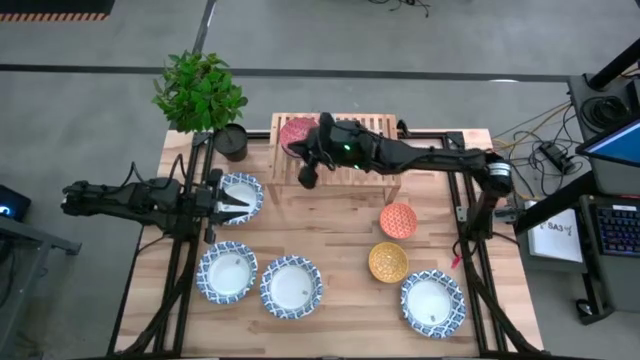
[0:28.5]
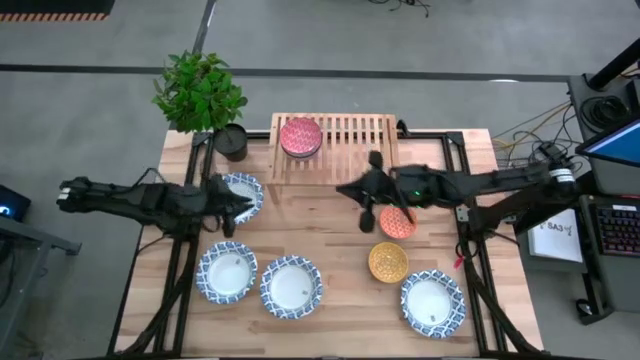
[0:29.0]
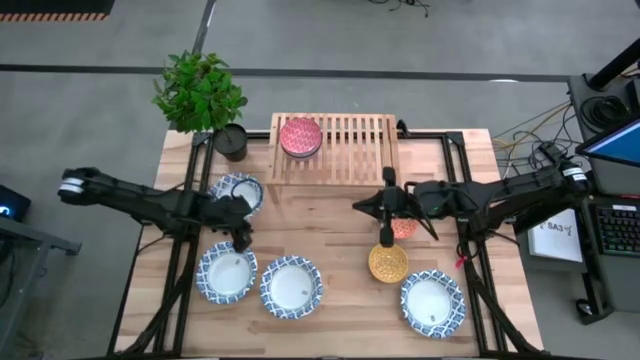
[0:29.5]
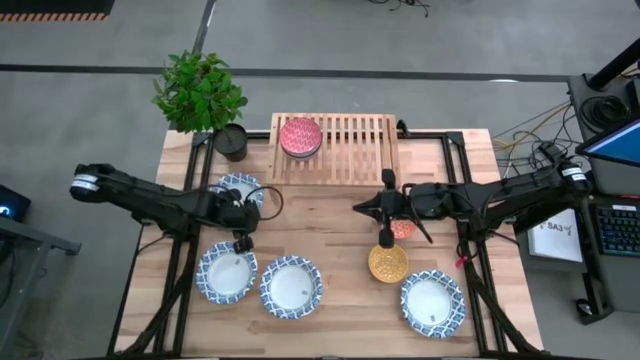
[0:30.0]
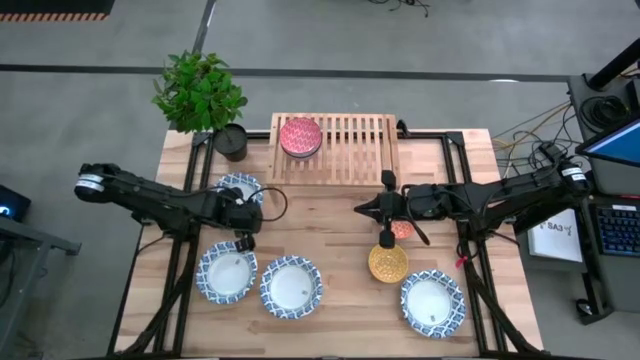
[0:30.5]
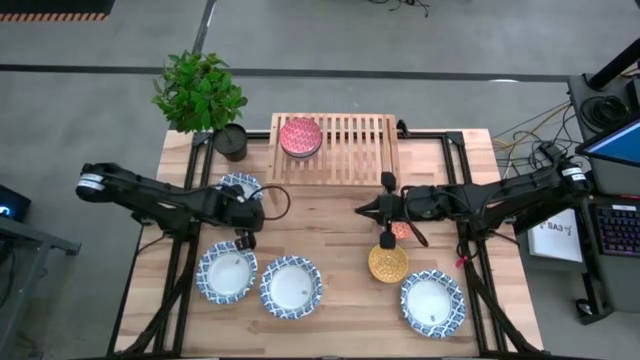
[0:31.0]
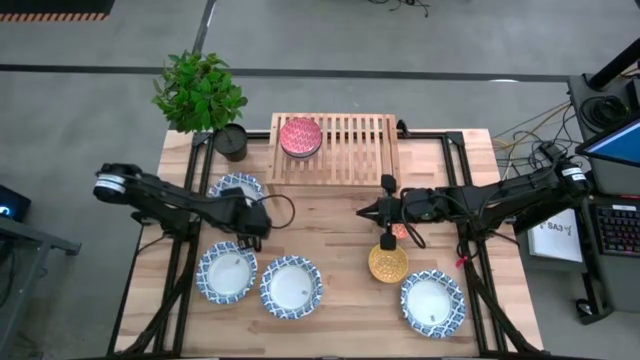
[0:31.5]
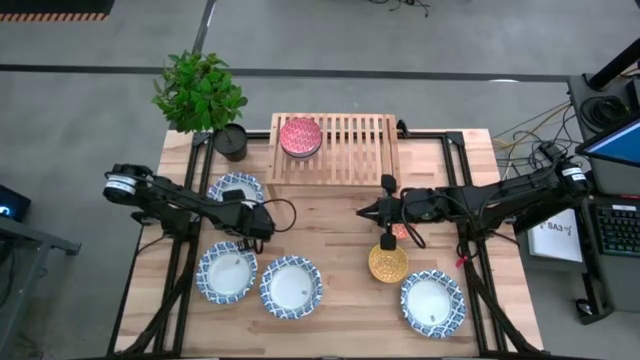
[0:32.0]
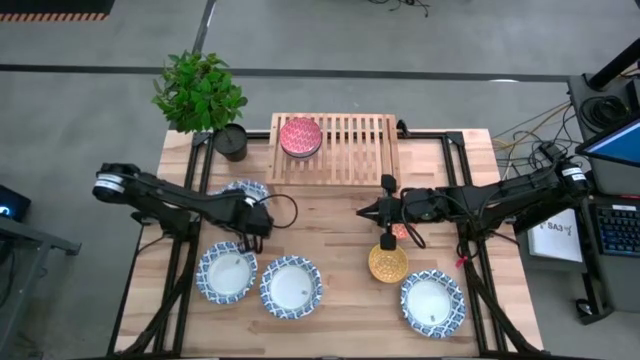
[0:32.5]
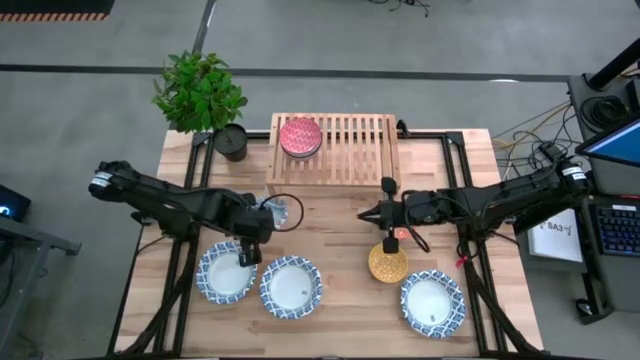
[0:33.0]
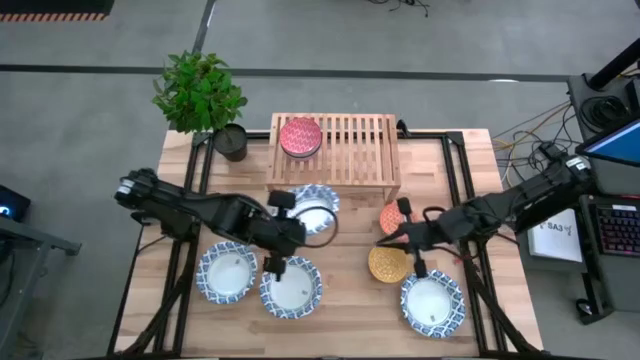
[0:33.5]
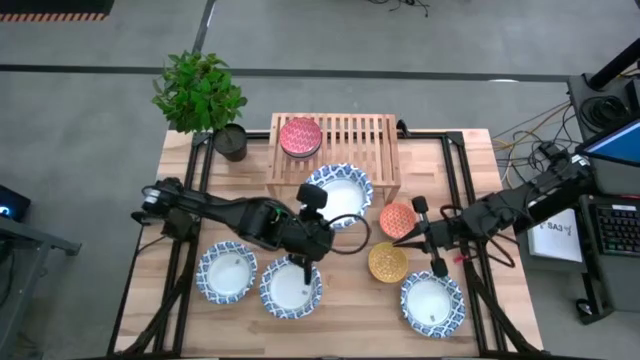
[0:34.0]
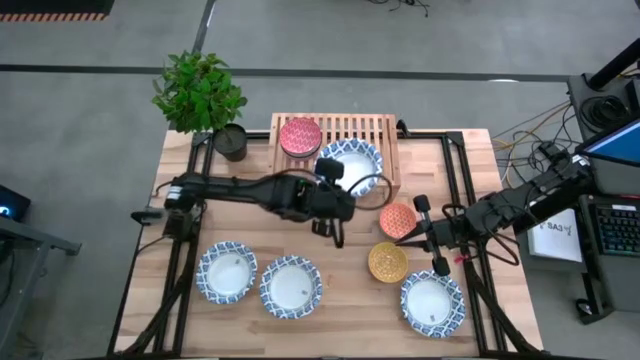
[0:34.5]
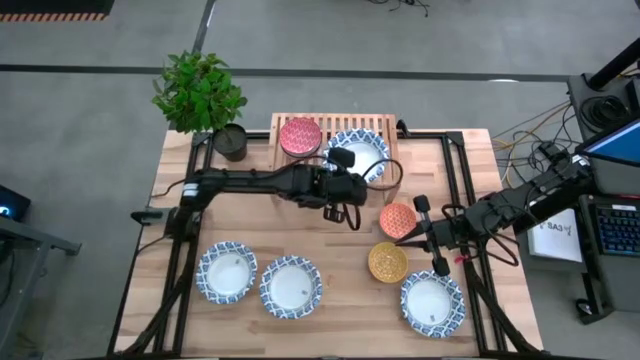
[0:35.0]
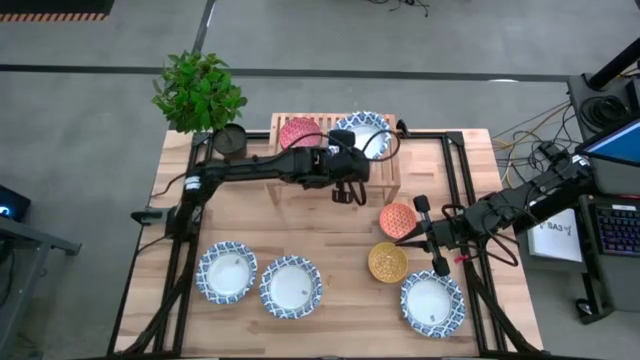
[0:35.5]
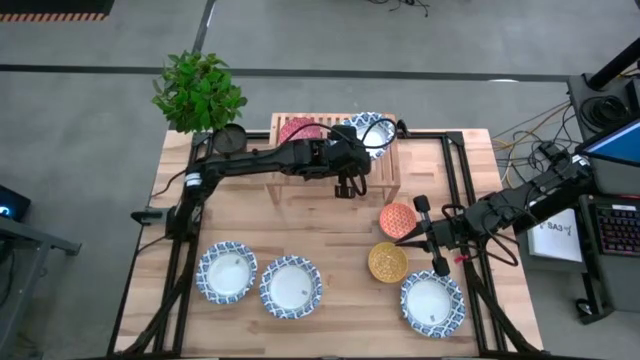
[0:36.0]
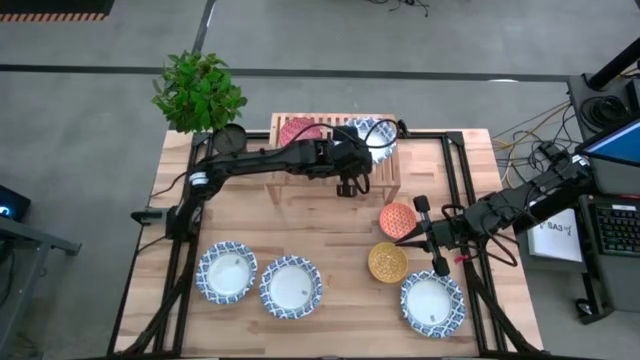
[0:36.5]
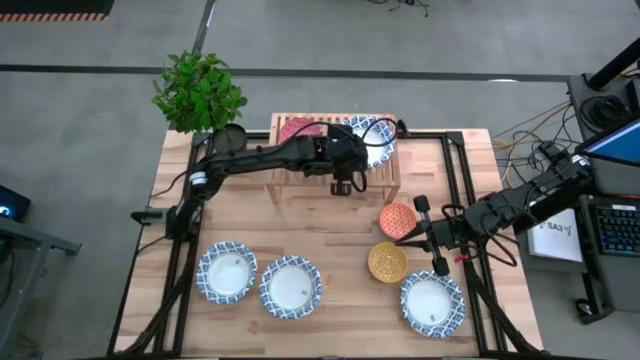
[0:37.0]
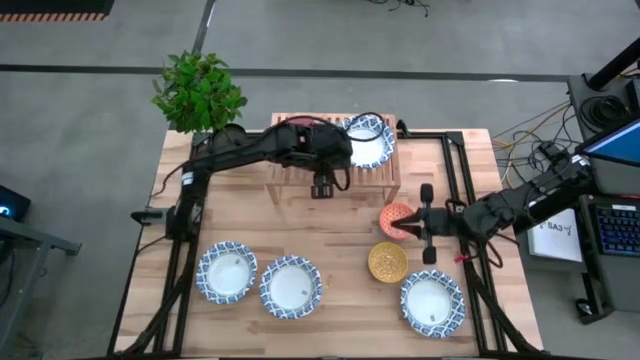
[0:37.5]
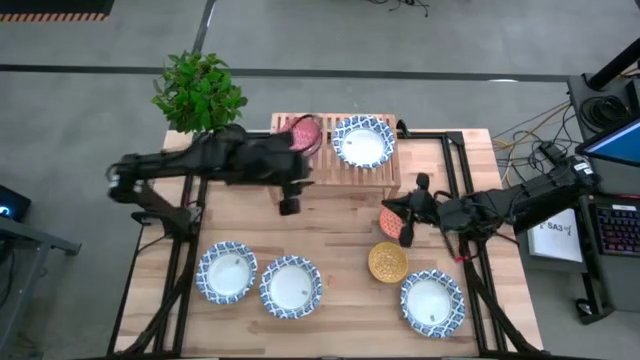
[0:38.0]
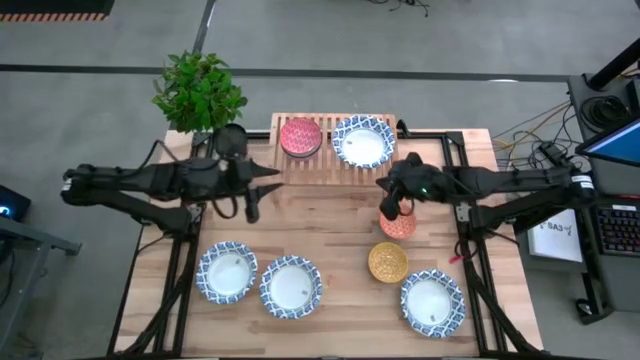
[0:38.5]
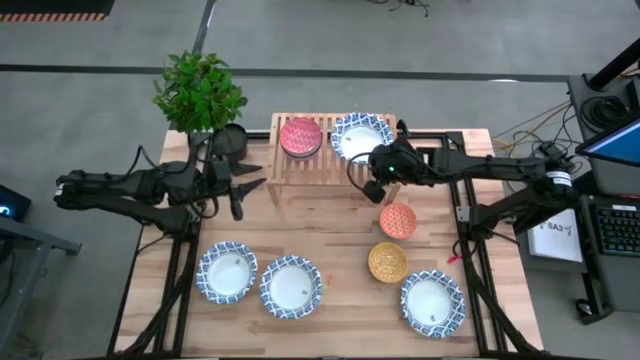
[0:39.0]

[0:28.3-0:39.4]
Task: Place and stack bowls onto a shelf
Put the white patterned bowl on the shelf

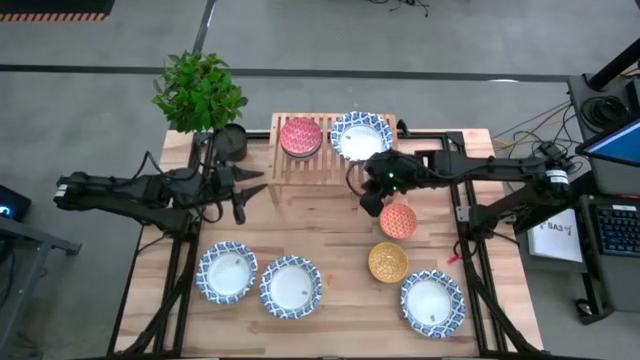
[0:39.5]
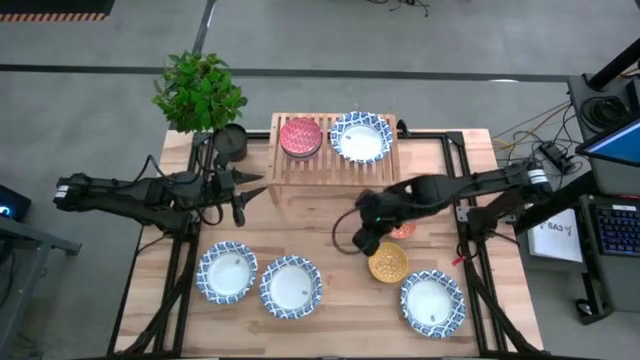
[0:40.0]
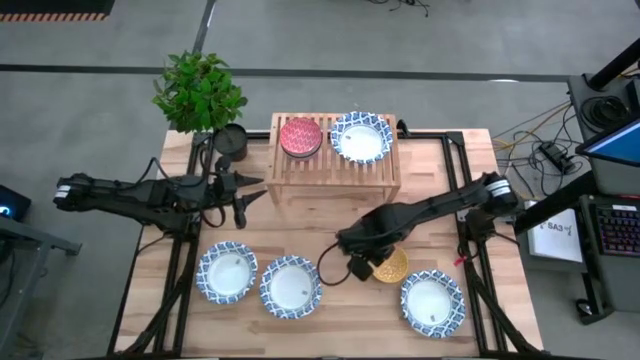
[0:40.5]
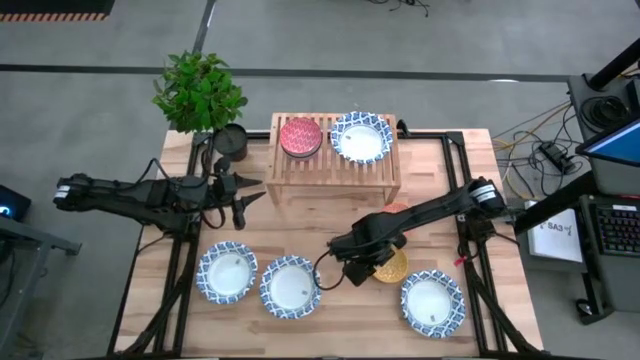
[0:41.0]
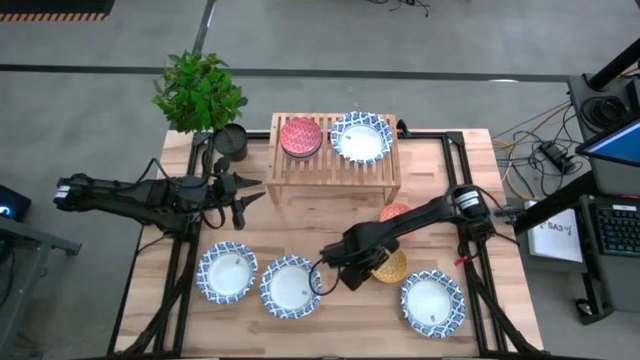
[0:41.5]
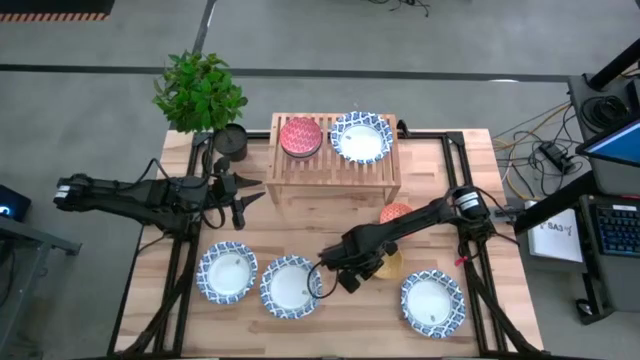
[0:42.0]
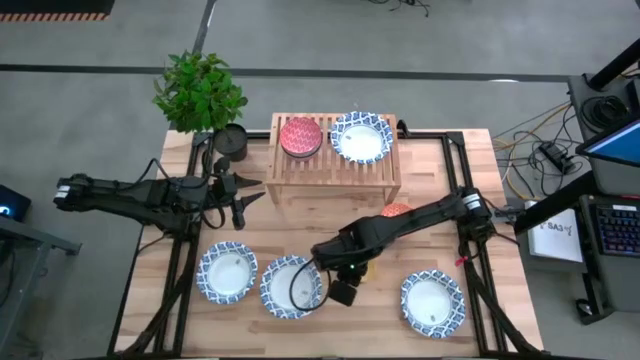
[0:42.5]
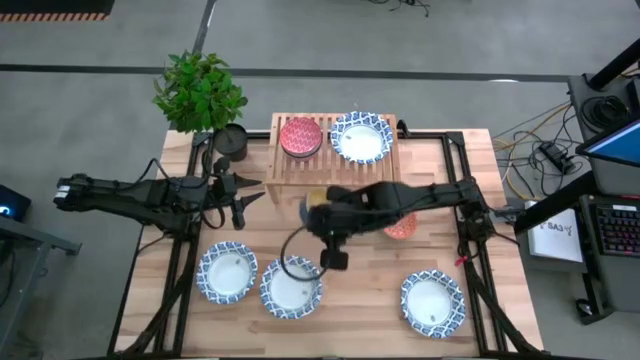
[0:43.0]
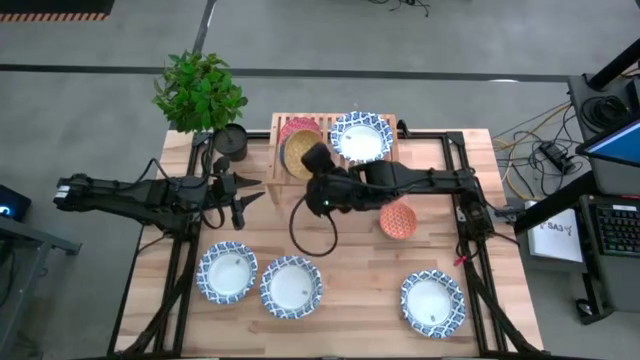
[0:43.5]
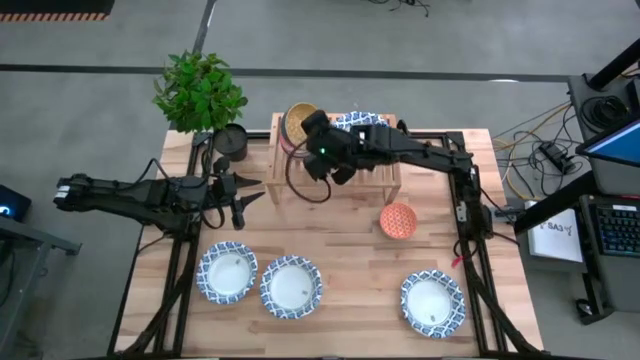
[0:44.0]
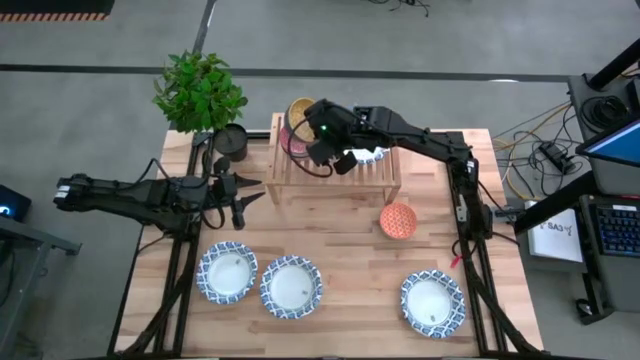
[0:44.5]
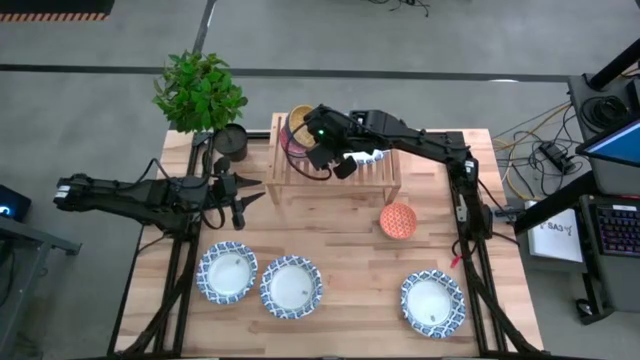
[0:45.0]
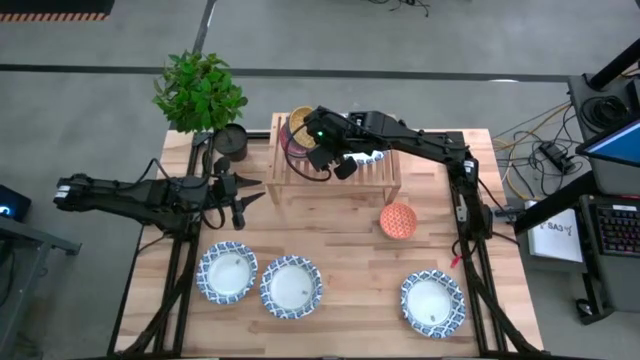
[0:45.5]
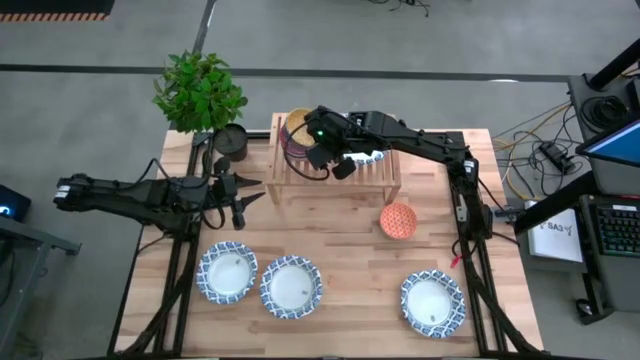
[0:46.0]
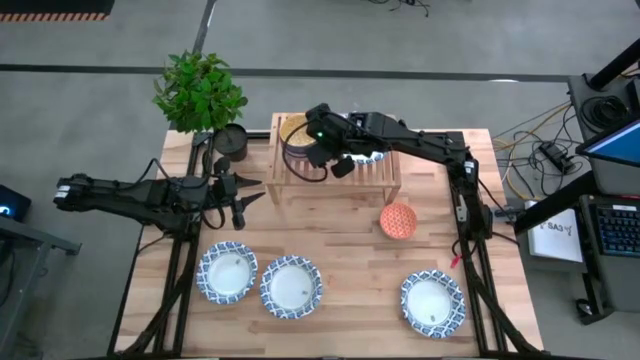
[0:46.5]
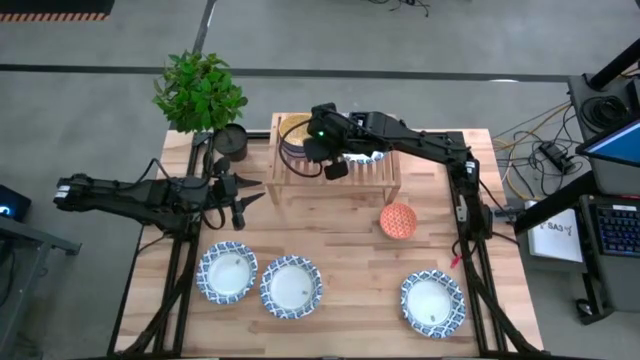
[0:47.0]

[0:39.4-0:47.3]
Stack the yellow bowl on top of the red bowl on the shelf

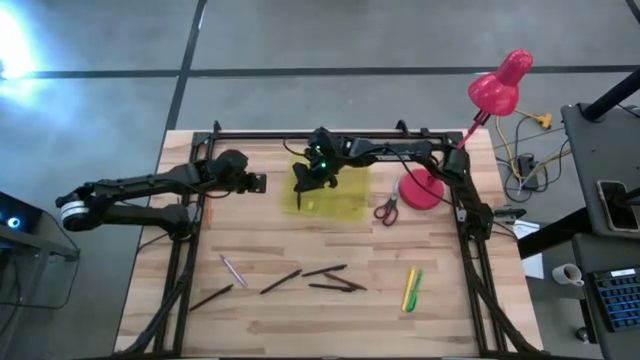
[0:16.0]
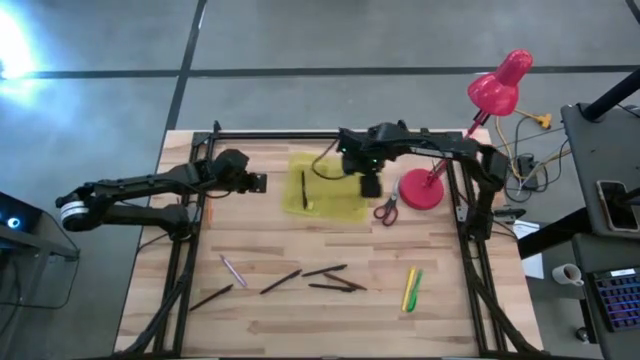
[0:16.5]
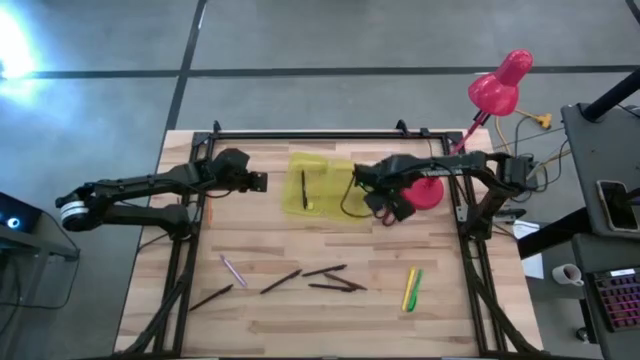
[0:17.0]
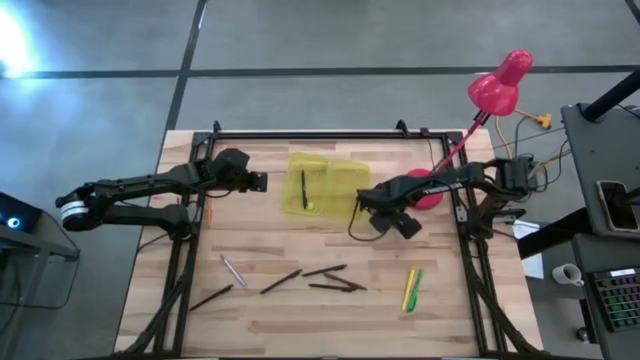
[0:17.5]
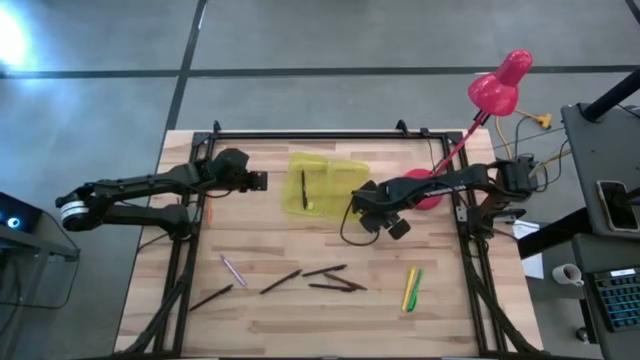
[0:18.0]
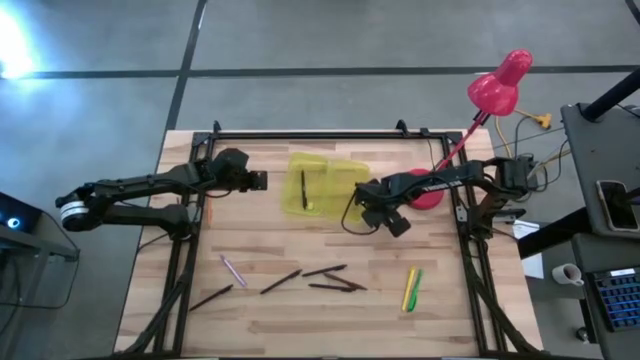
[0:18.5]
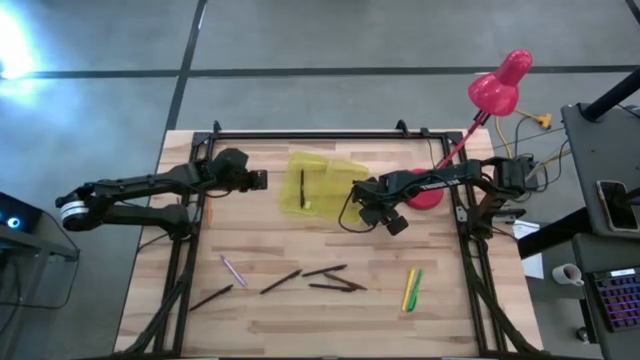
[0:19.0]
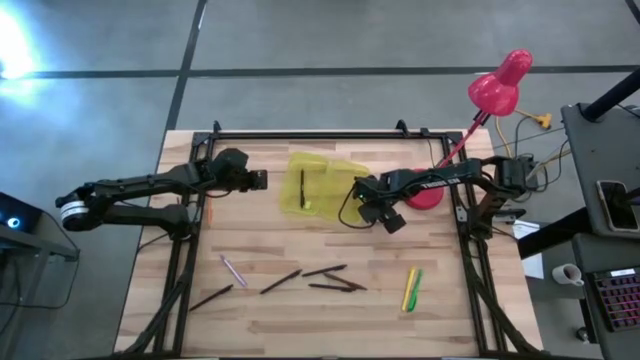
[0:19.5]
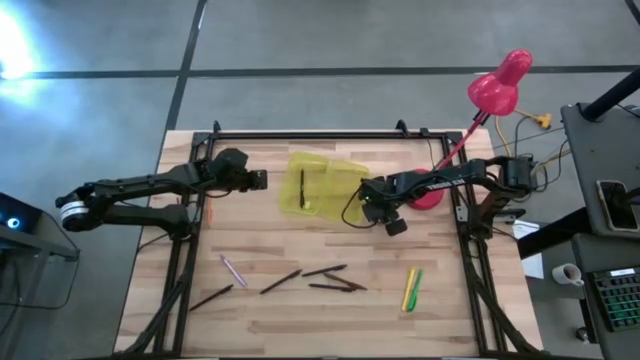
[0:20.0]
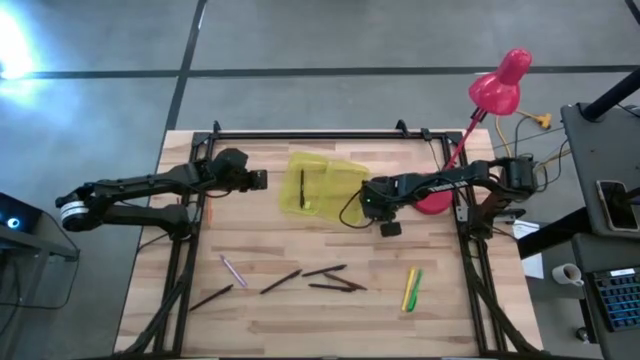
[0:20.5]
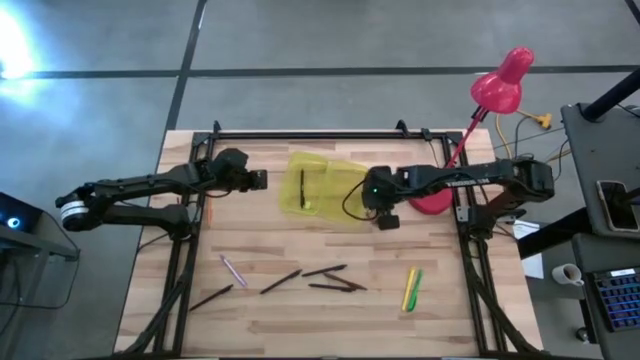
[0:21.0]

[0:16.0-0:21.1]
Task: Pick & place school supplies into a supply box
Put the scissors into the supply box
